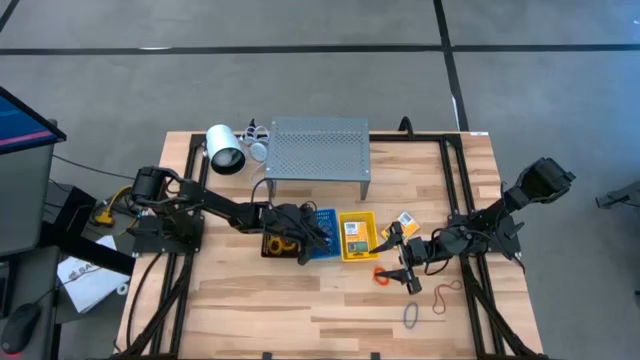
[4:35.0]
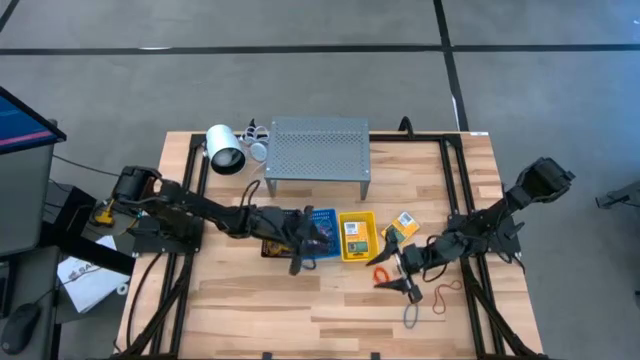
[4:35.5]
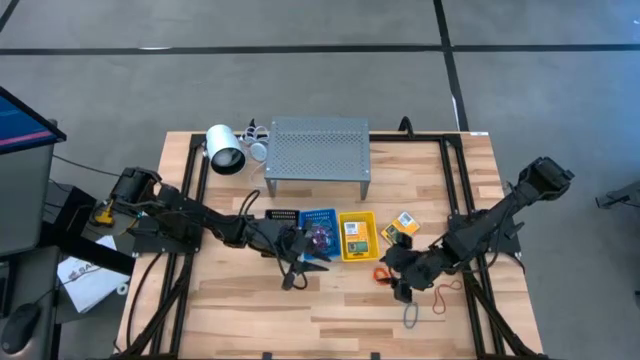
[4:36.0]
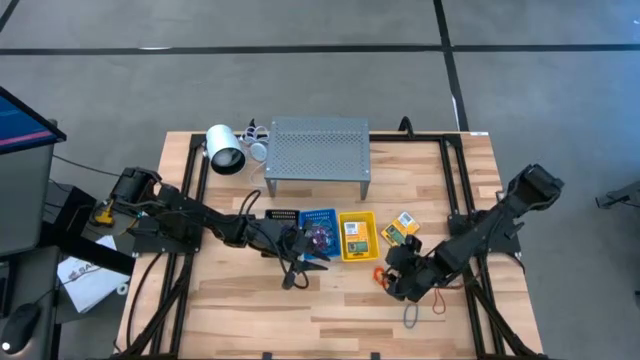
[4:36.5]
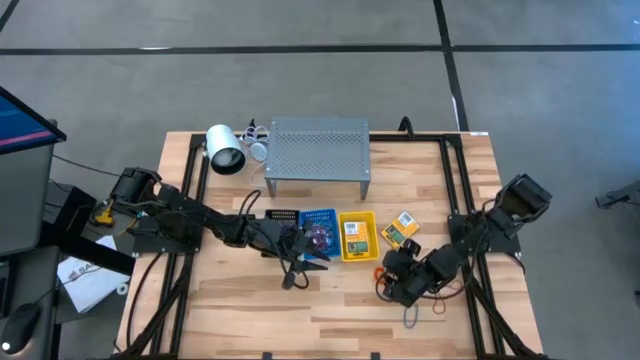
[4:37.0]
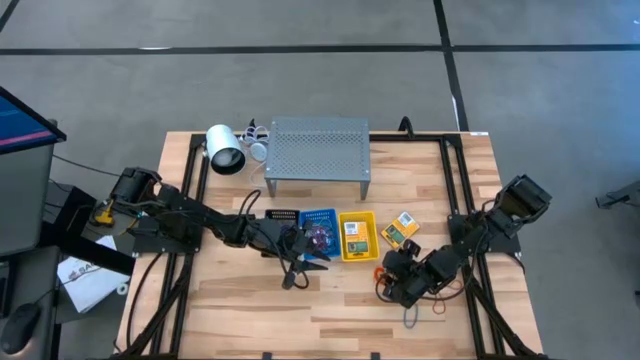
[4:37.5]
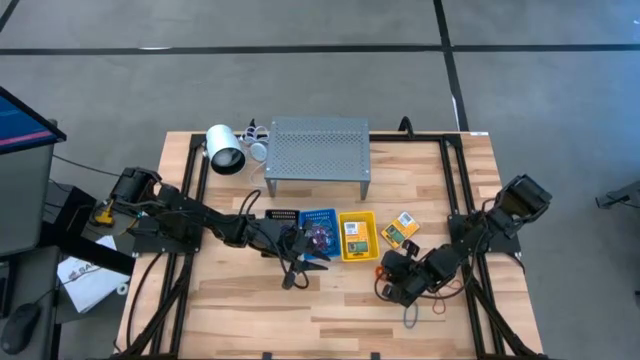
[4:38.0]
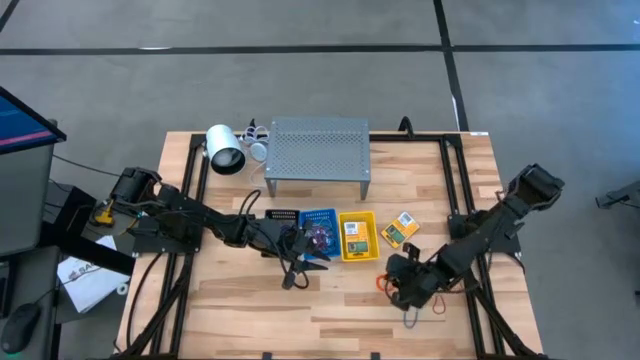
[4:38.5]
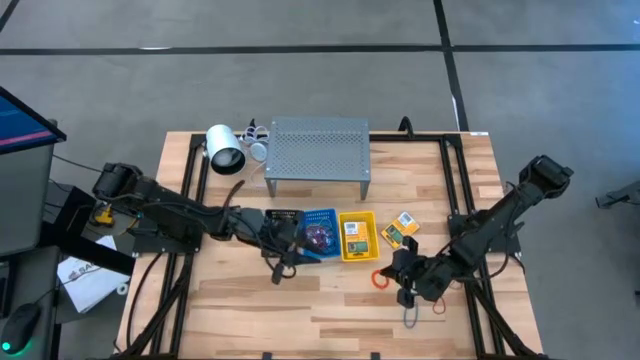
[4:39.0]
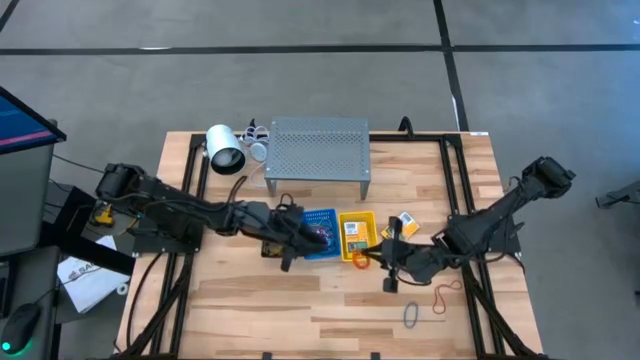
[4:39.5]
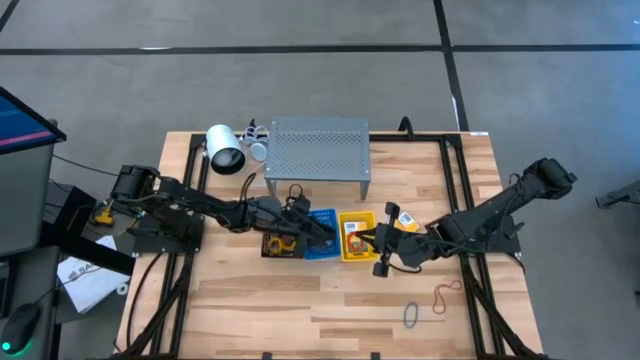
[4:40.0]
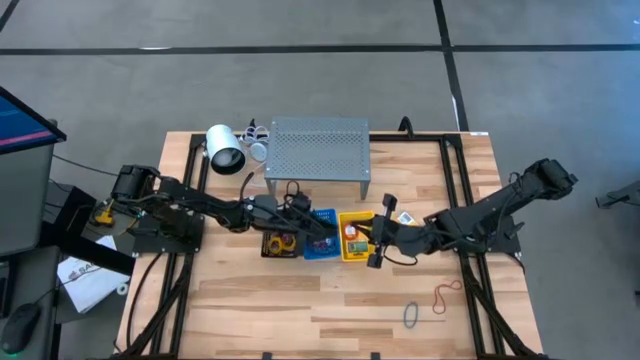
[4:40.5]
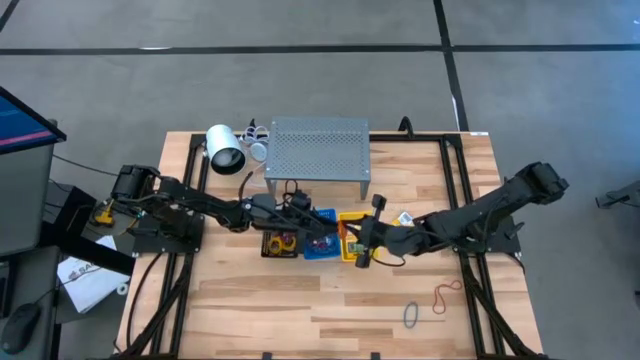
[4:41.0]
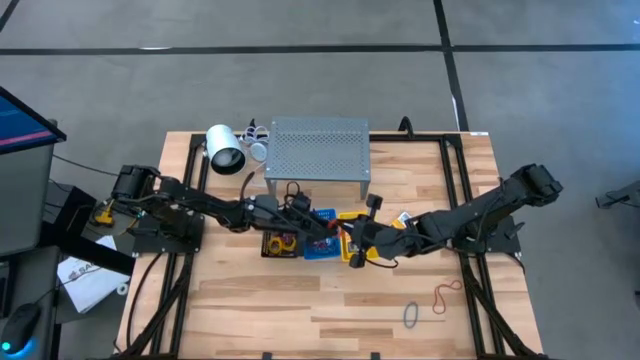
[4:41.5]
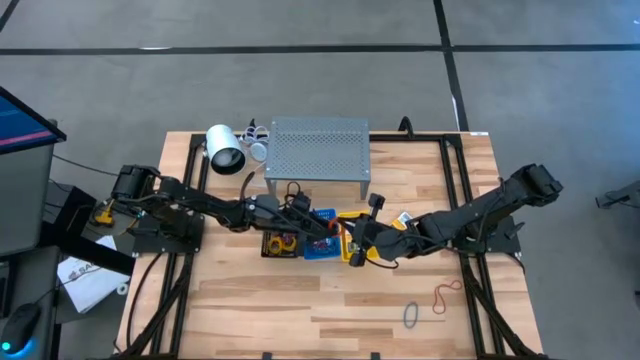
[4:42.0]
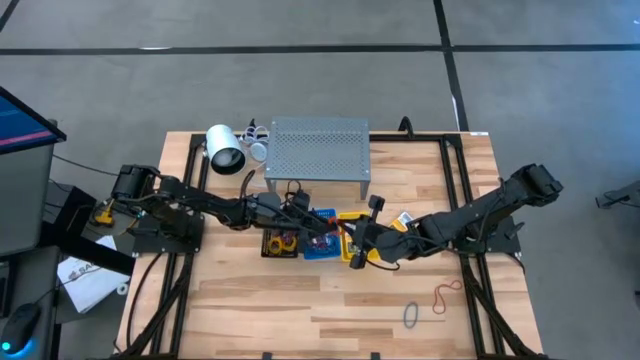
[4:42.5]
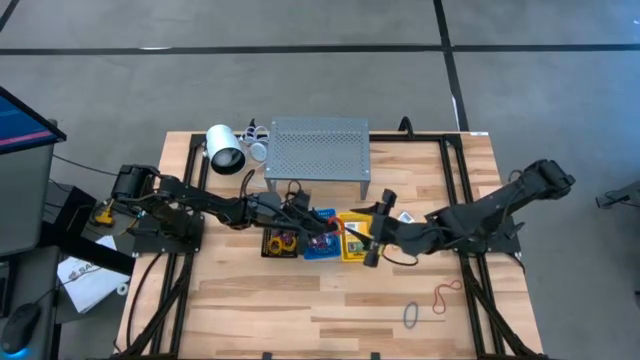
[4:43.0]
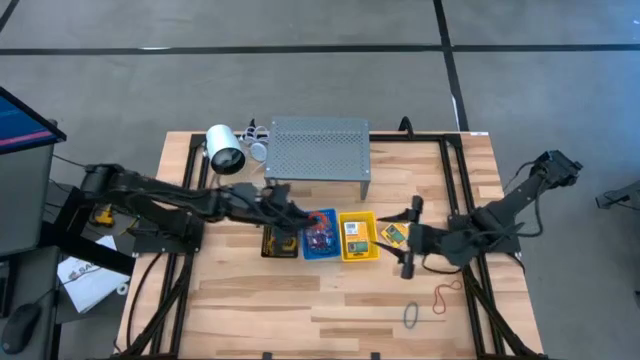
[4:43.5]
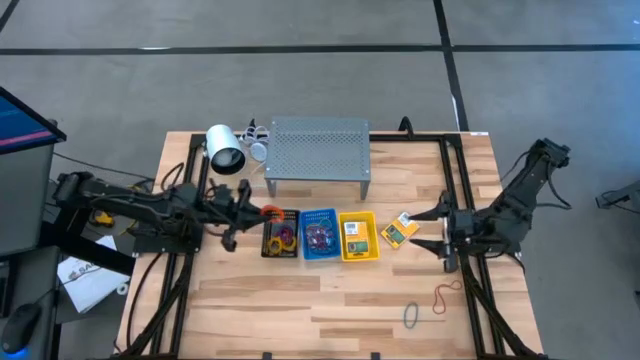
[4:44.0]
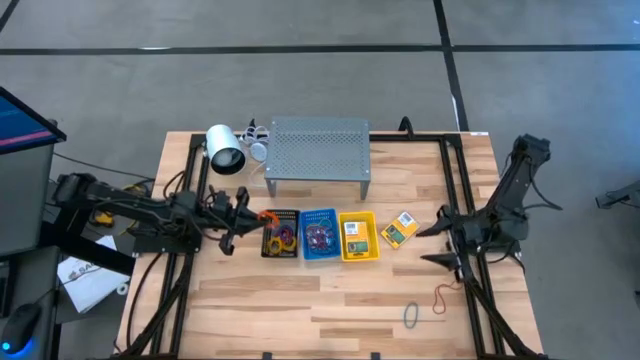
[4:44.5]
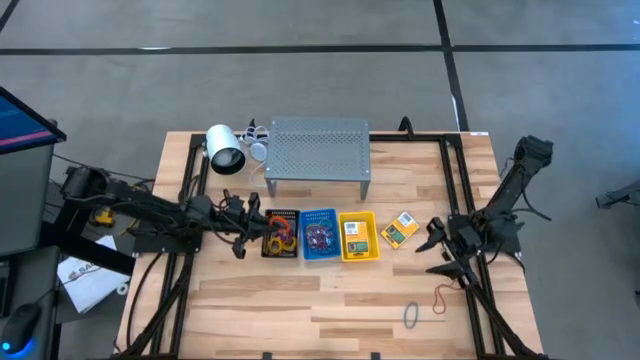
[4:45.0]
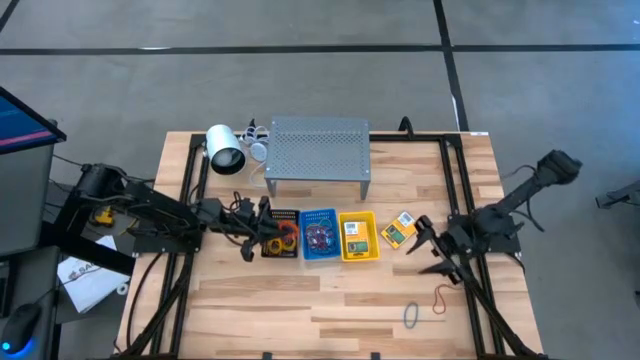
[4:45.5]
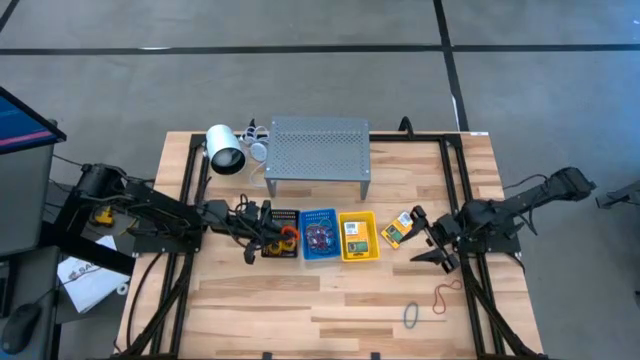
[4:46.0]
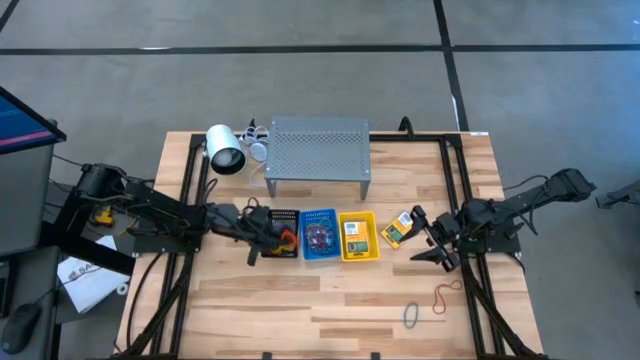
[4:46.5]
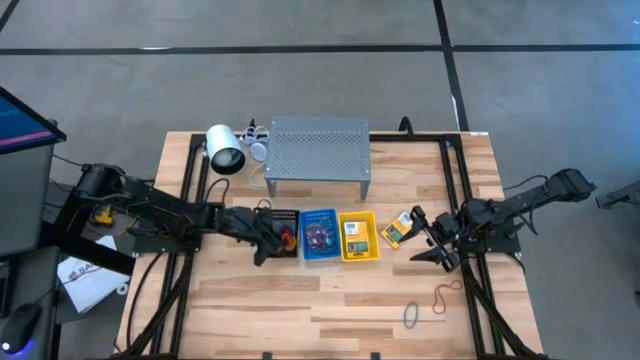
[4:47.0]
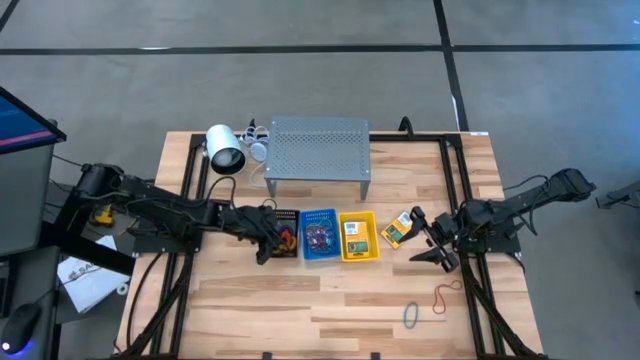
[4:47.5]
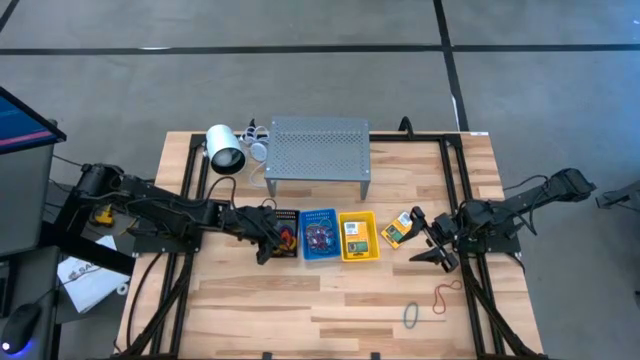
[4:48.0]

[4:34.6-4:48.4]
Task: Pick & Place Office Desk Supplies
Put the orange spring keychain into the black basket

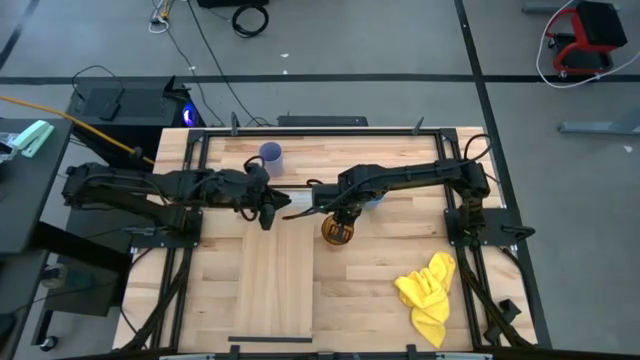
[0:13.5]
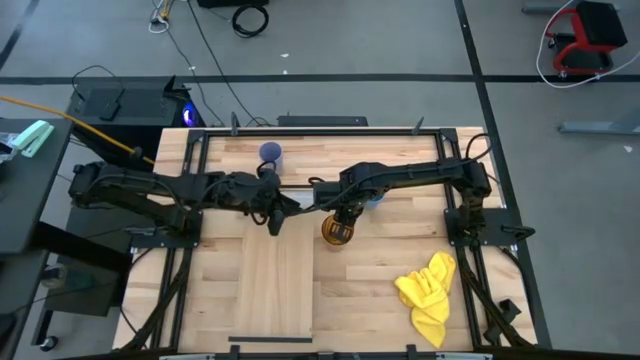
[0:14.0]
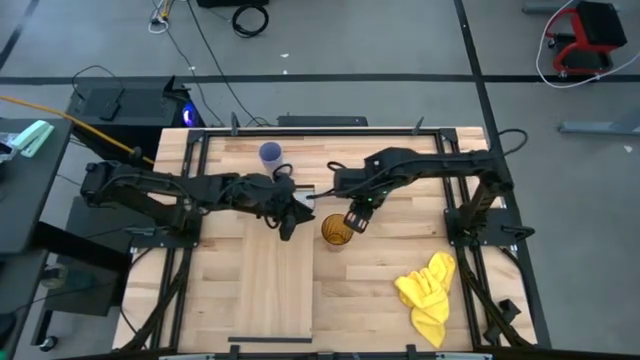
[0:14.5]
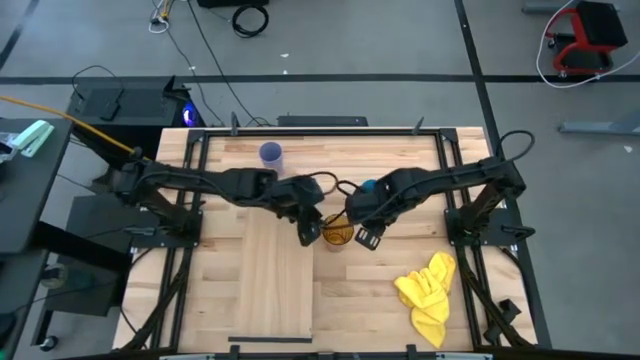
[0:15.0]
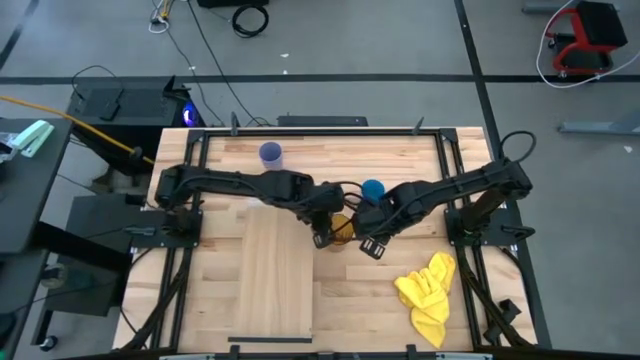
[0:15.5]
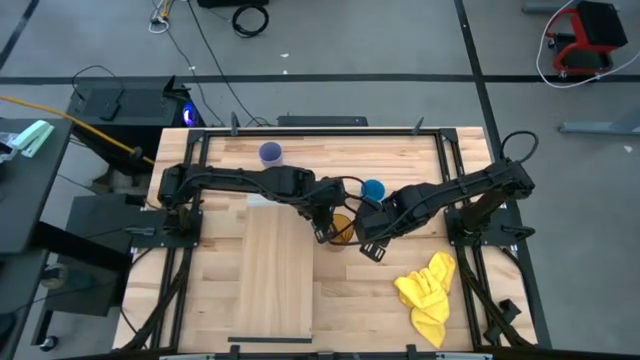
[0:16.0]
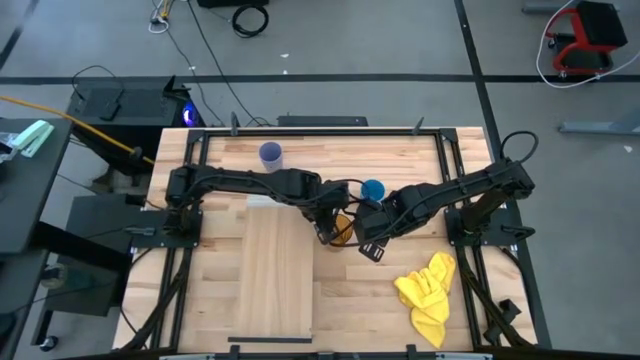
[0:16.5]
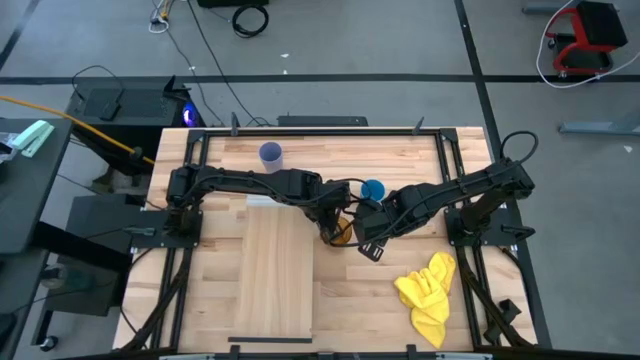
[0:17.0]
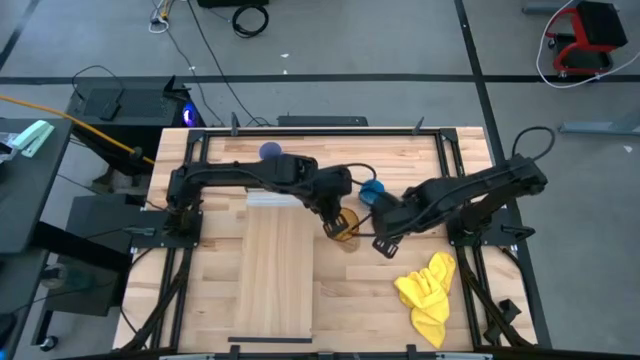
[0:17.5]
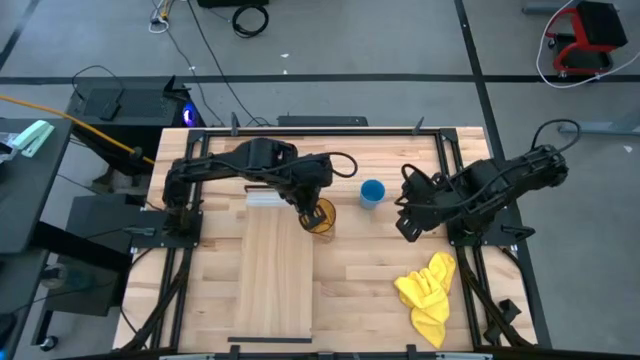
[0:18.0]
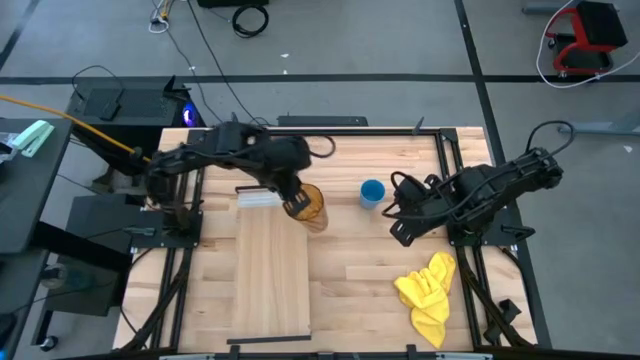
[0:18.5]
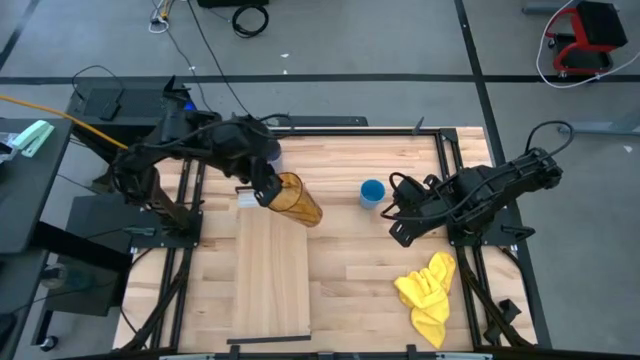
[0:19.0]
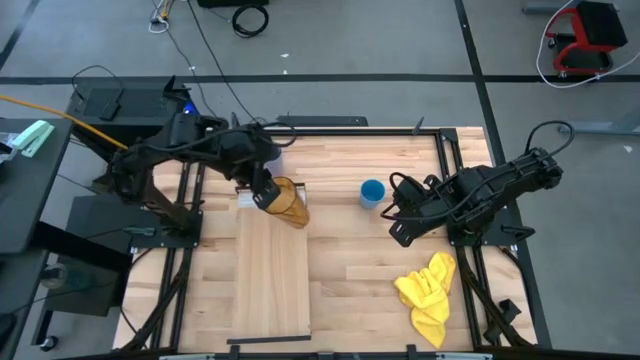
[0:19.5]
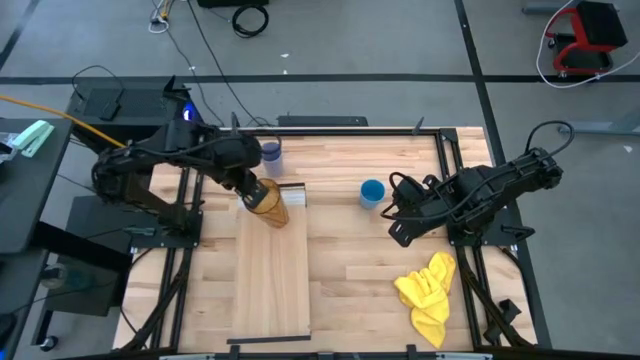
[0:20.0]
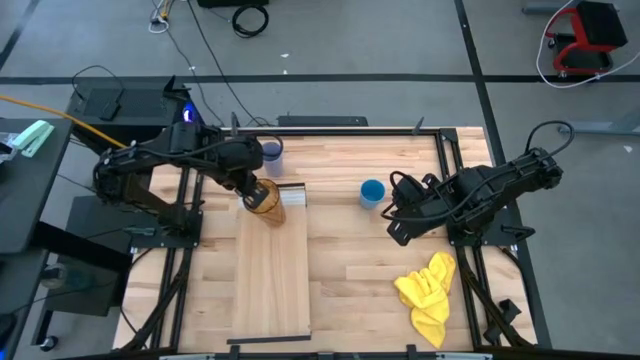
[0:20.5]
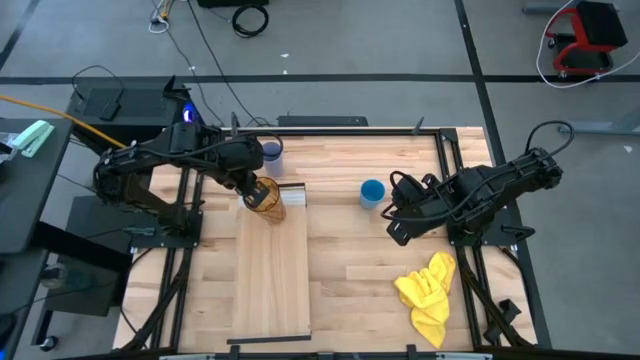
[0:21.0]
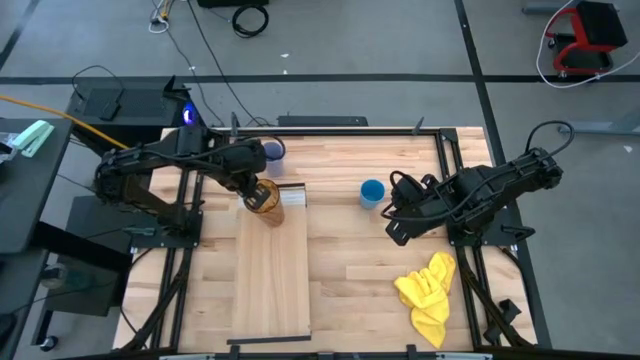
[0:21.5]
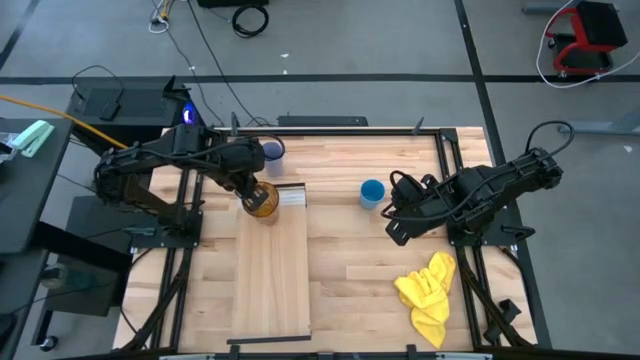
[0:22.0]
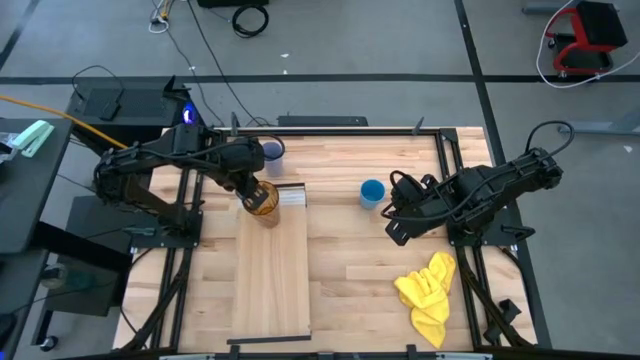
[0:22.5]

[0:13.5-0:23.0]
Task: Stack small to large cups/mugs on shelf
Put the brown cup on the shelf
